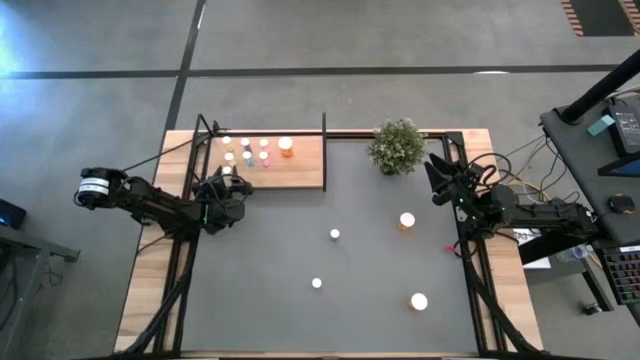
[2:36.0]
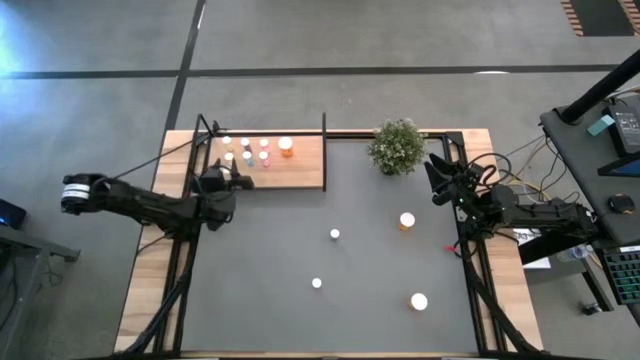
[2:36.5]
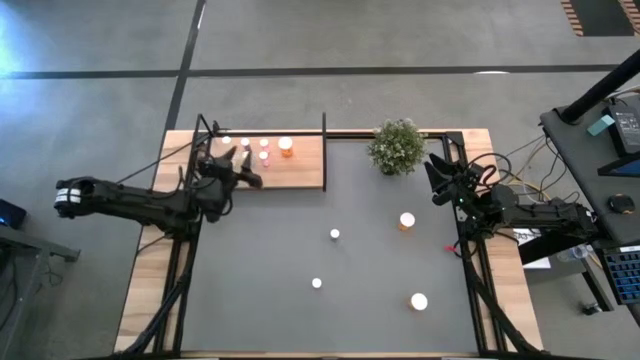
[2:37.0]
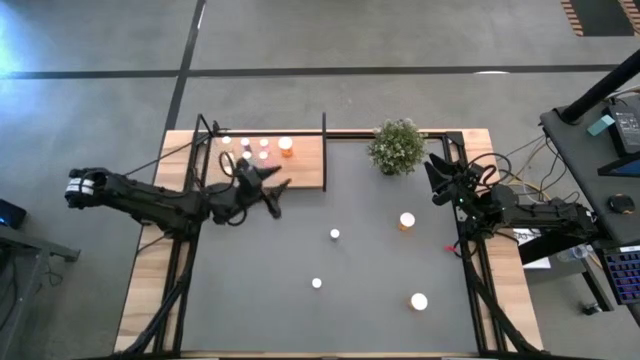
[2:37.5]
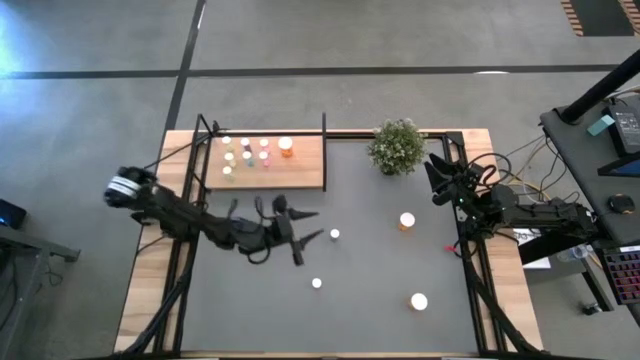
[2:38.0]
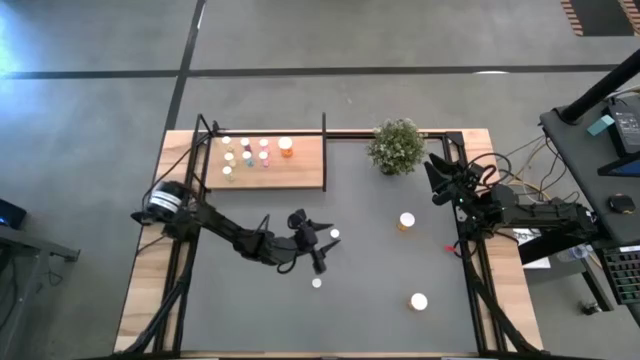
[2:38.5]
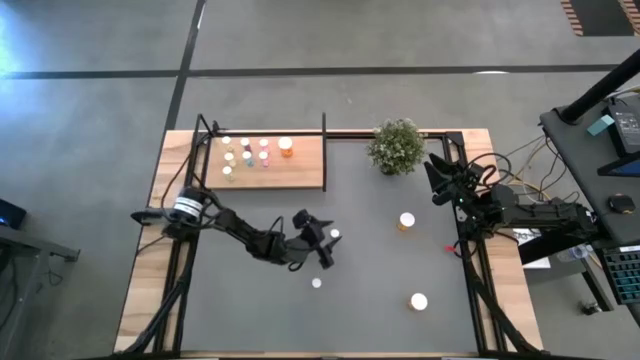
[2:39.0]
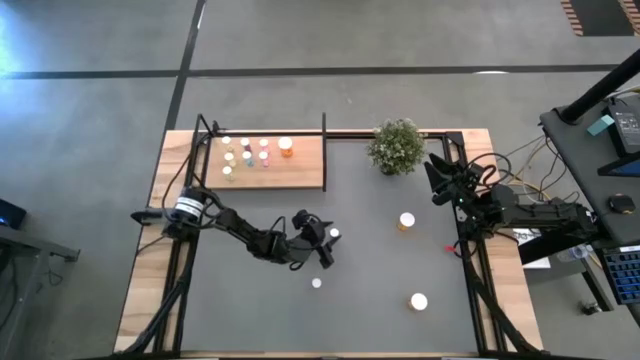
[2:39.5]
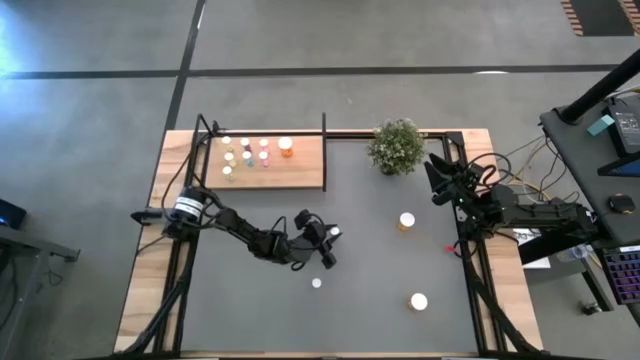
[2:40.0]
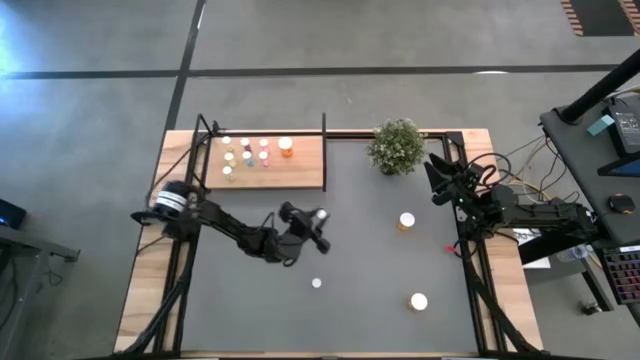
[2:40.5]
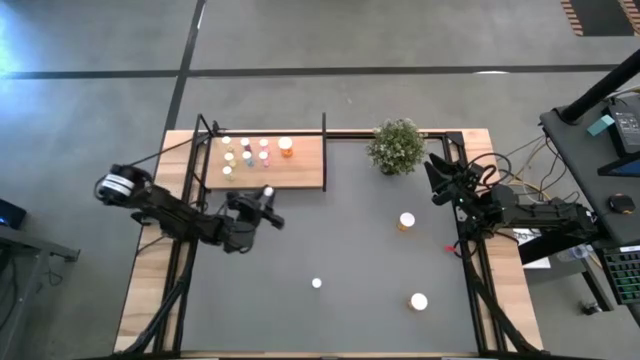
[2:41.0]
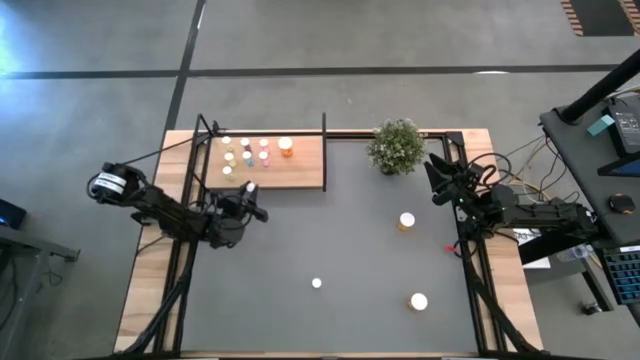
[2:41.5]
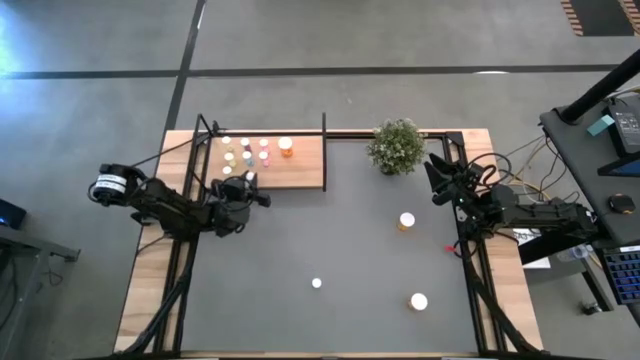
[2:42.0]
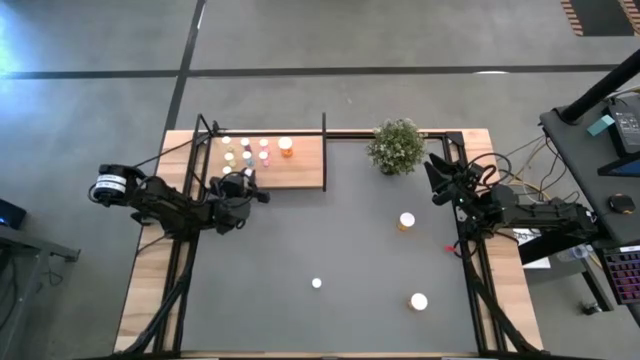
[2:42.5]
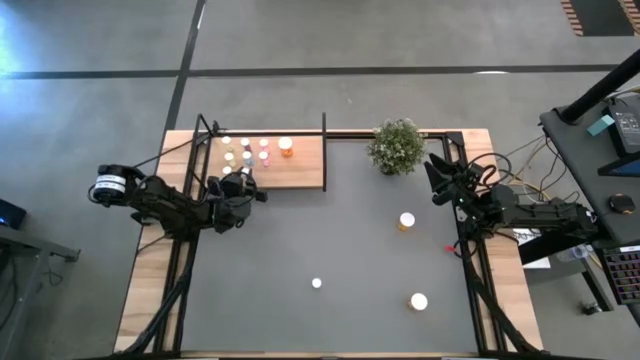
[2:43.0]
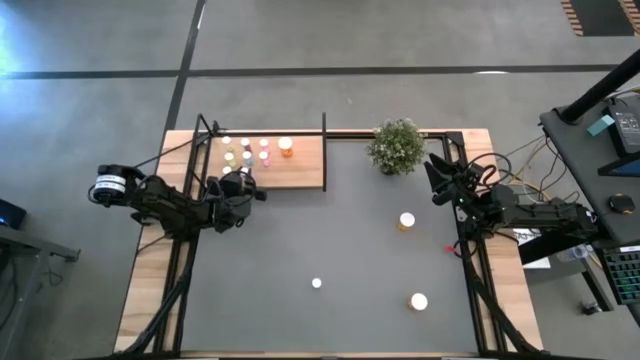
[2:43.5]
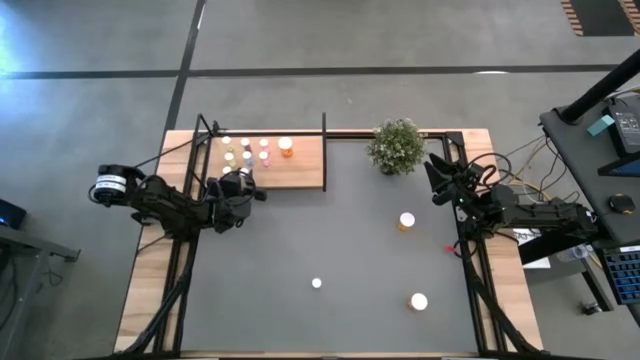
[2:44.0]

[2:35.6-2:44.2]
Task: Pick and place medicine bottles onto shelf by color
Put the blue pill bottle on the shelf aligned with the other blue pill bottles

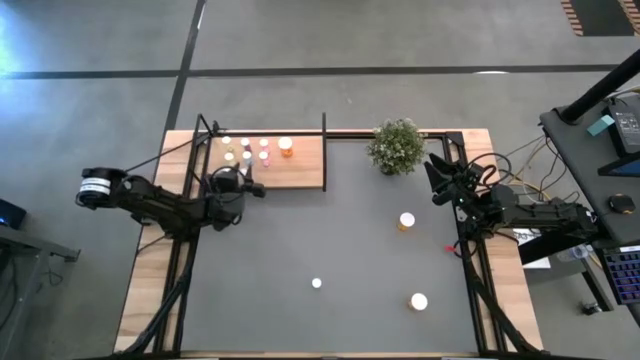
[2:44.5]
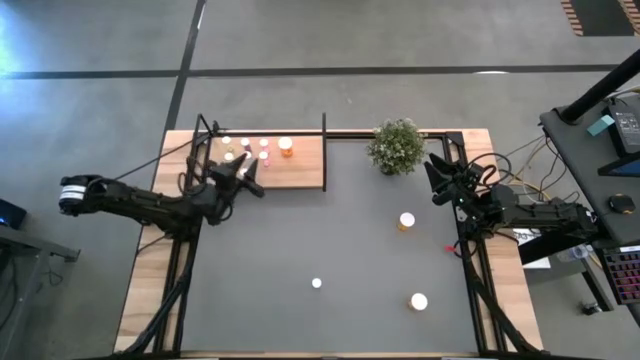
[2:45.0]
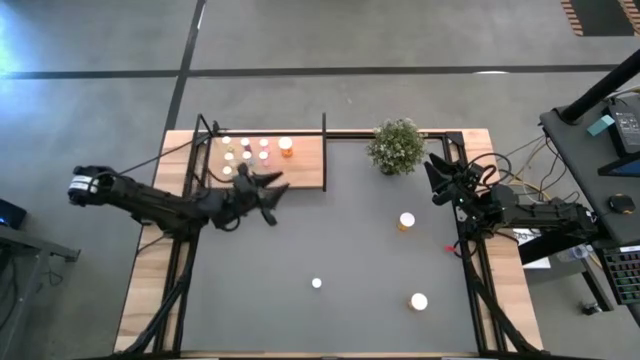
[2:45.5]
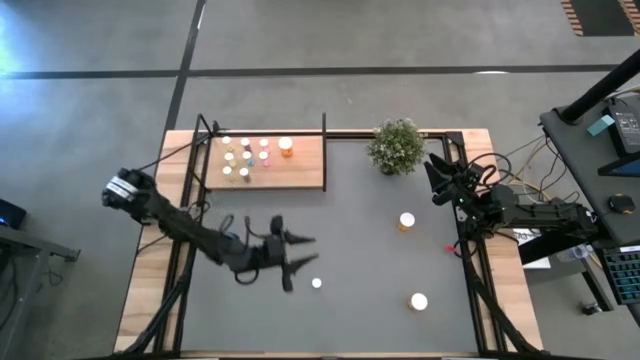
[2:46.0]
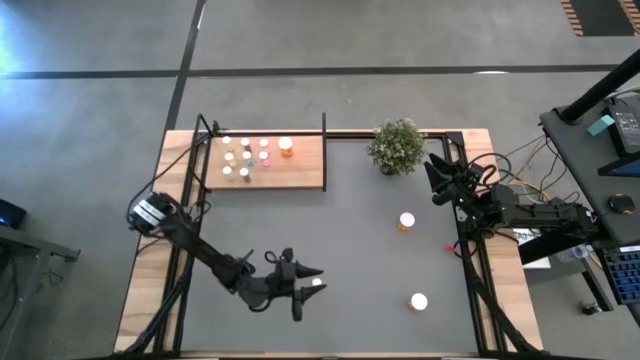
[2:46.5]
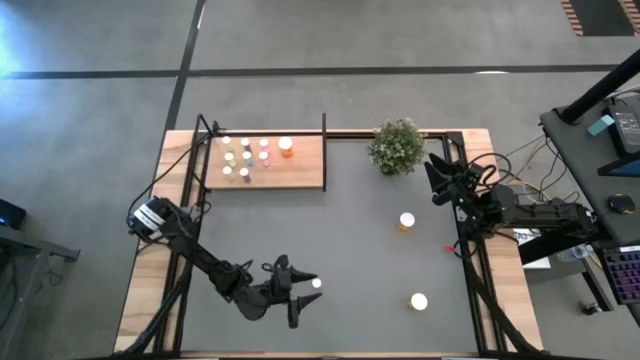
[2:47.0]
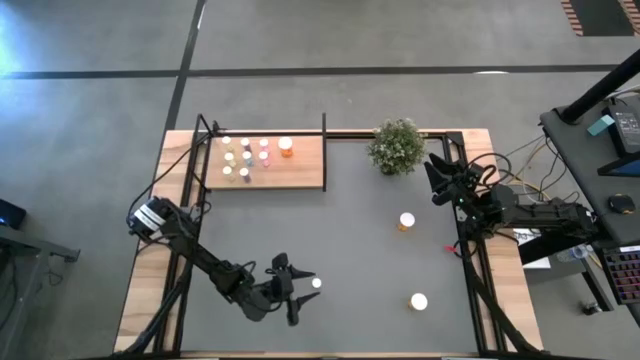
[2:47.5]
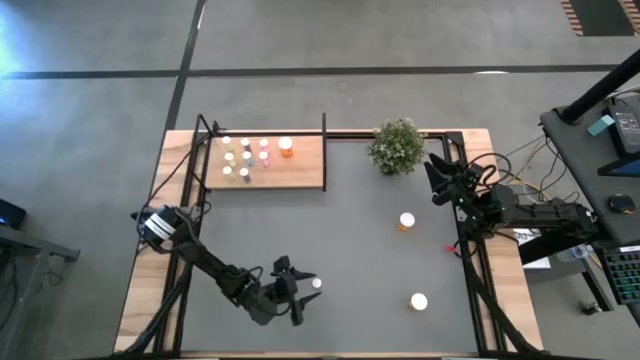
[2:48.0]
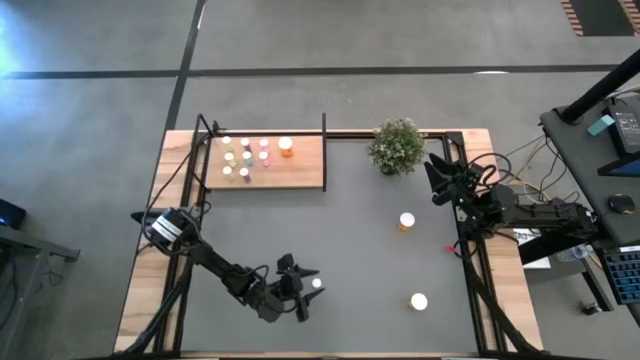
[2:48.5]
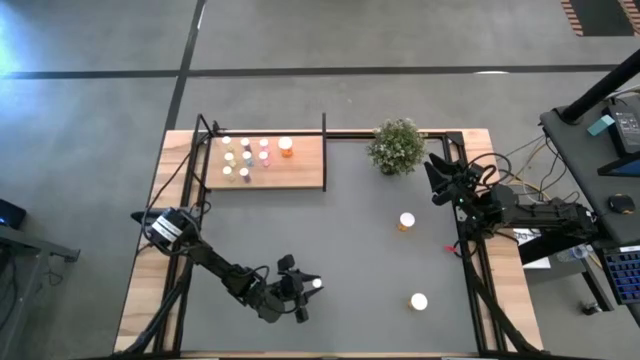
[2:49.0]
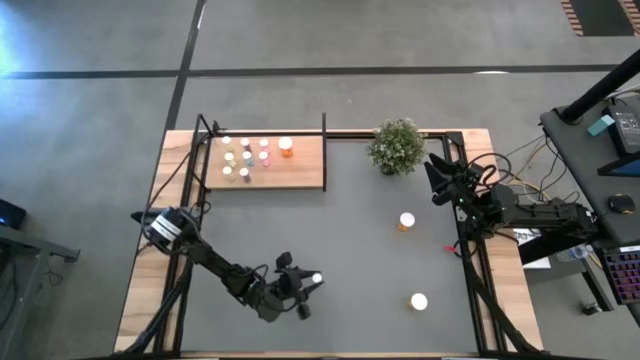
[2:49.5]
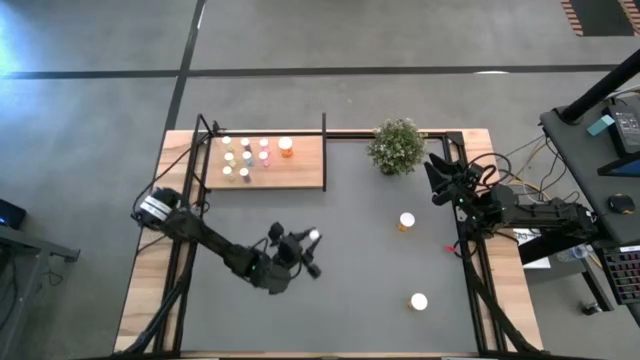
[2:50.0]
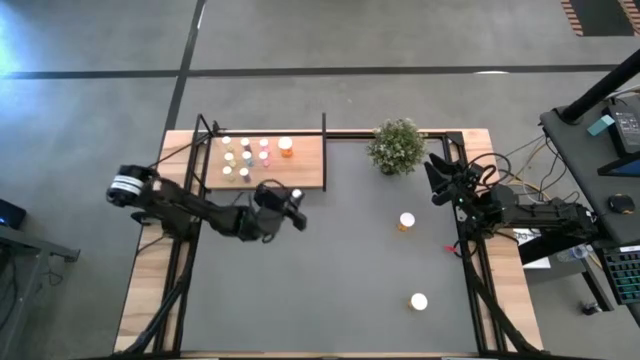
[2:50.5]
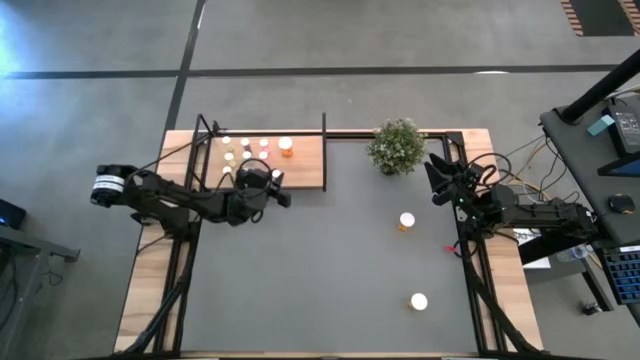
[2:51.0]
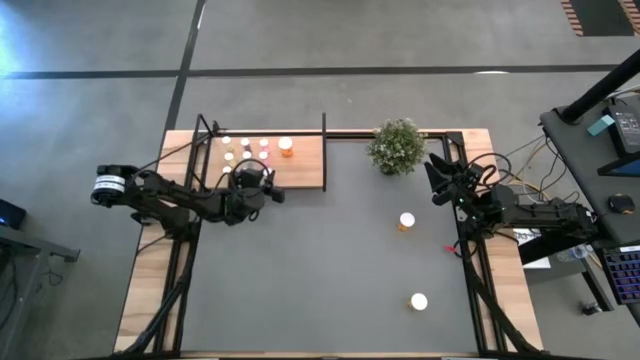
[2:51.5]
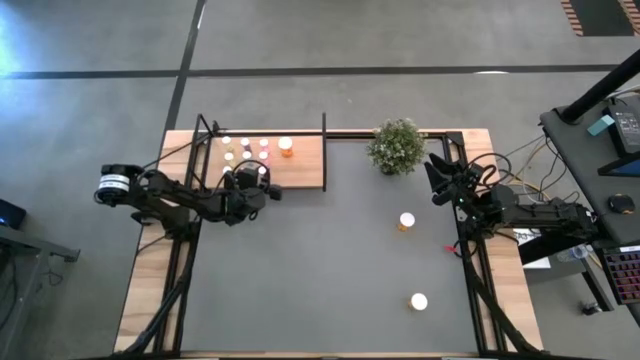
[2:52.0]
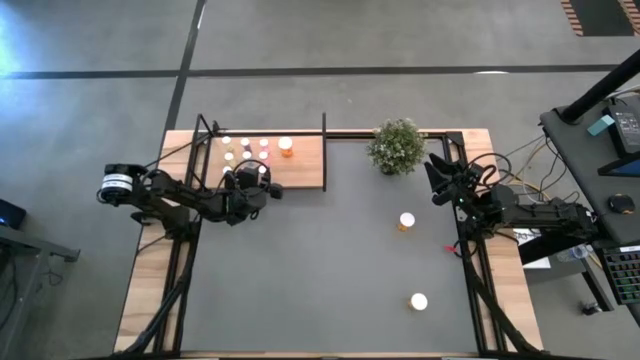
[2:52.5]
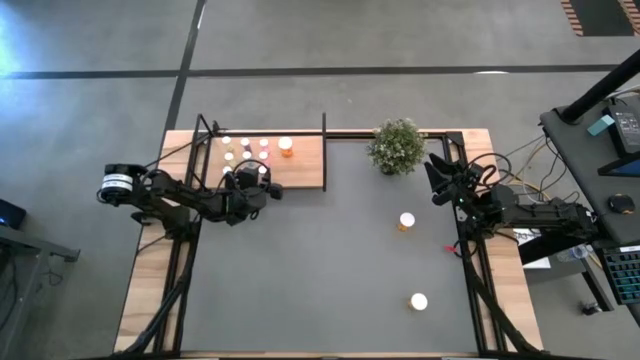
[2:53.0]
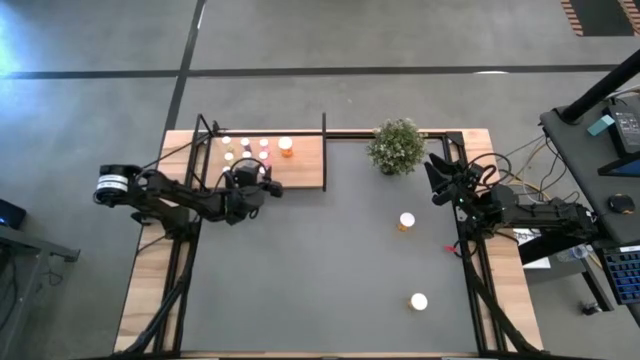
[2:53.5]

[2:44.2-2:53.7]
Put the pink pill bottle on the shelf aligned with the other pink pill bottles
